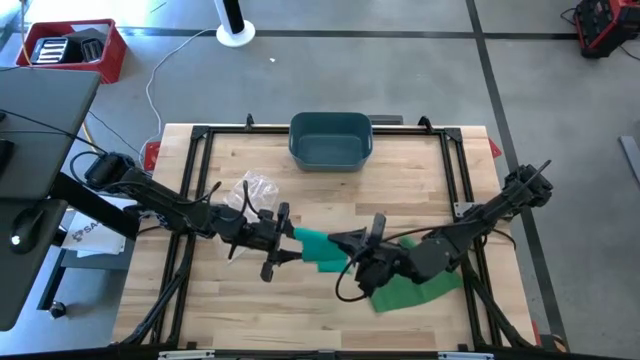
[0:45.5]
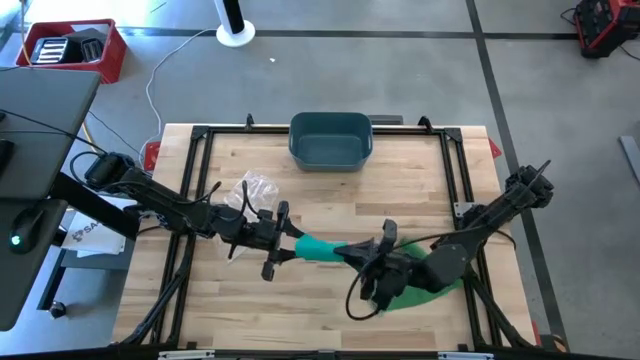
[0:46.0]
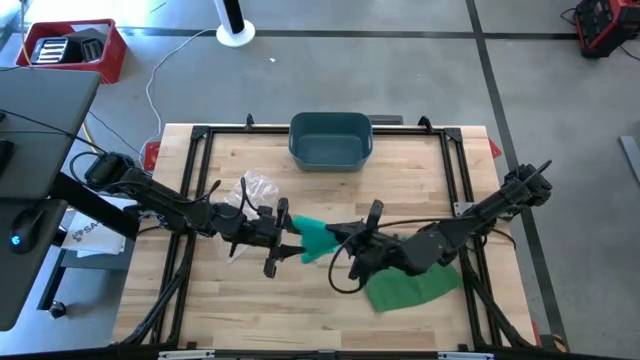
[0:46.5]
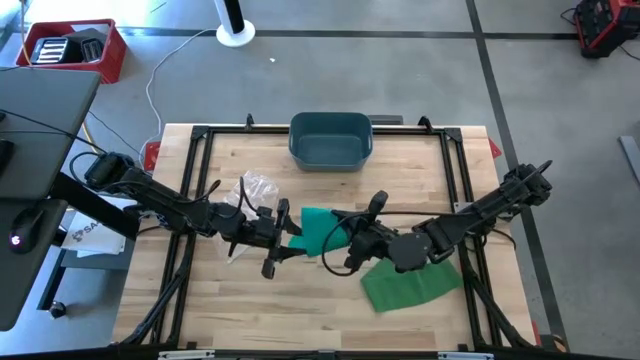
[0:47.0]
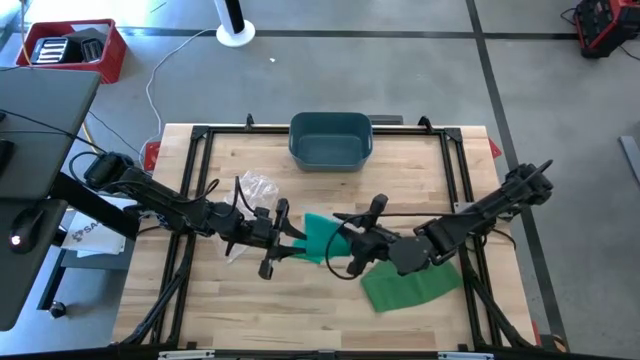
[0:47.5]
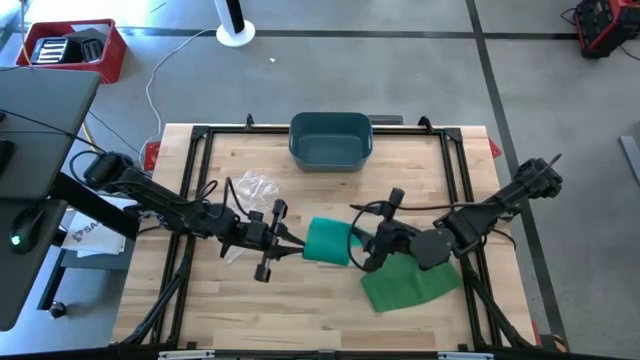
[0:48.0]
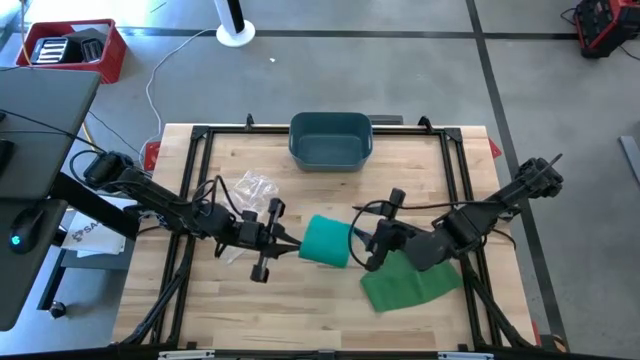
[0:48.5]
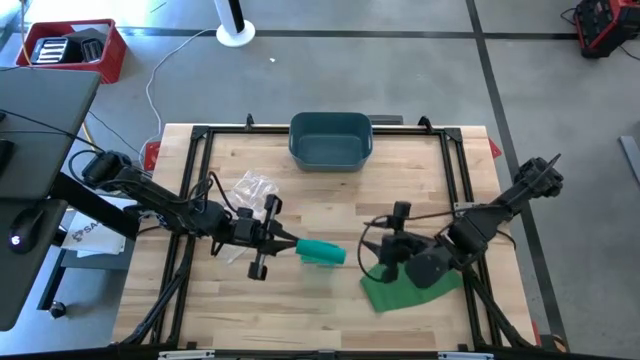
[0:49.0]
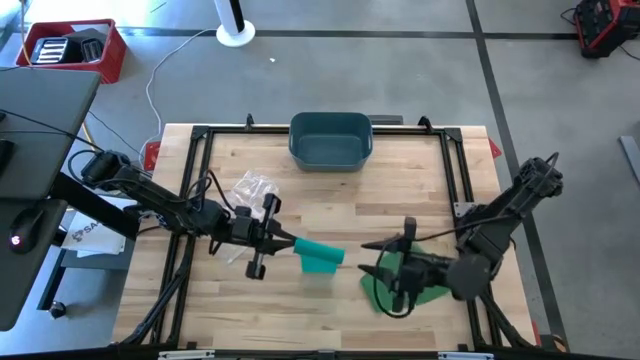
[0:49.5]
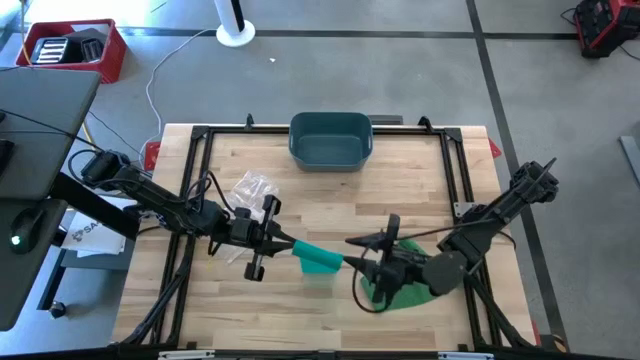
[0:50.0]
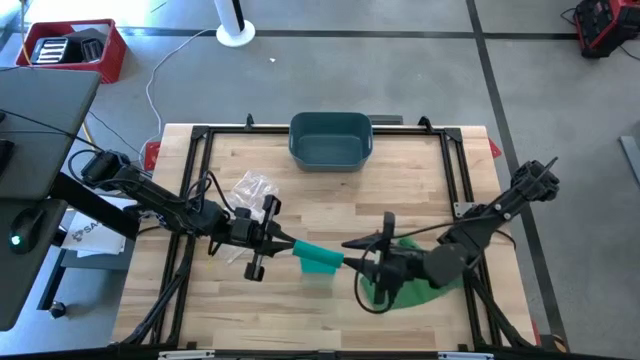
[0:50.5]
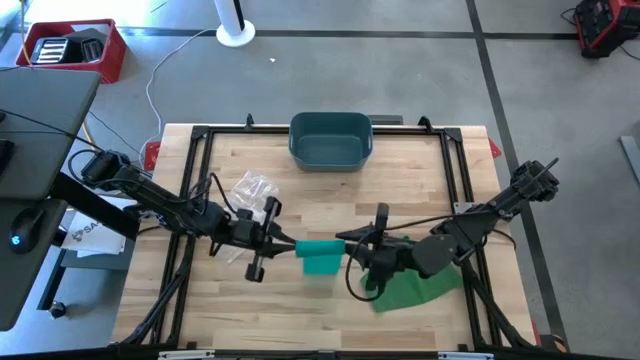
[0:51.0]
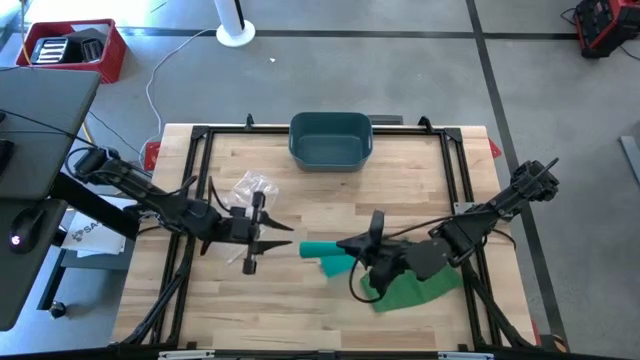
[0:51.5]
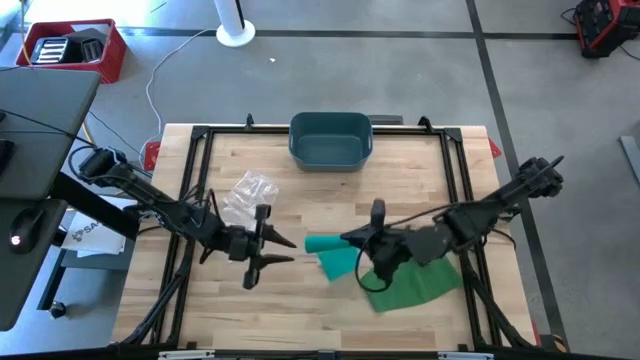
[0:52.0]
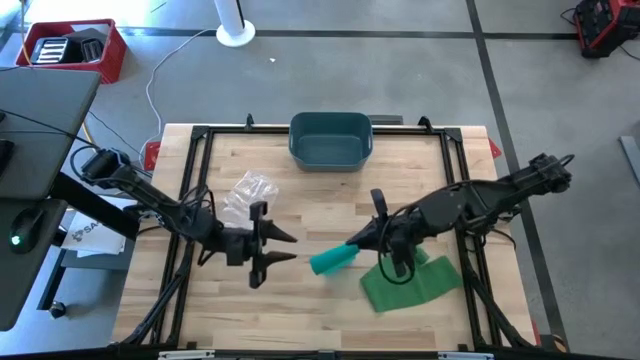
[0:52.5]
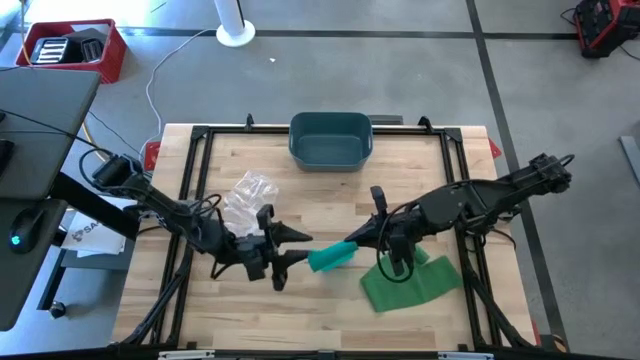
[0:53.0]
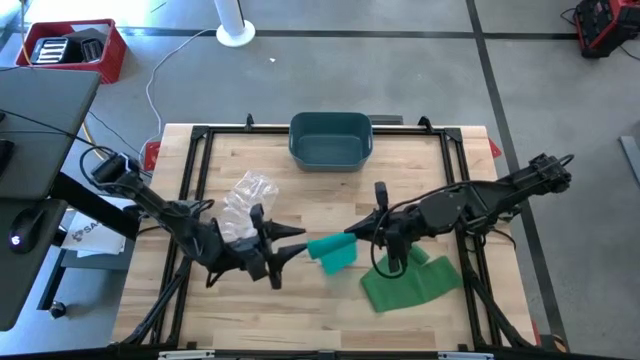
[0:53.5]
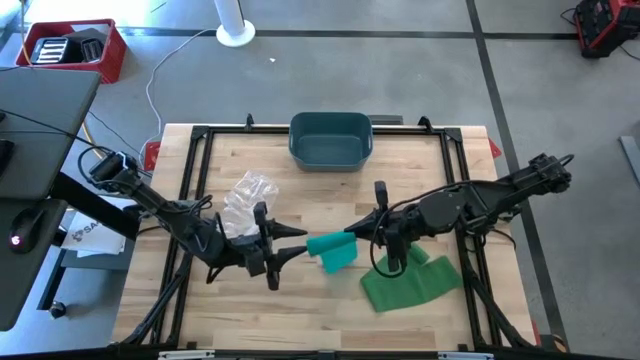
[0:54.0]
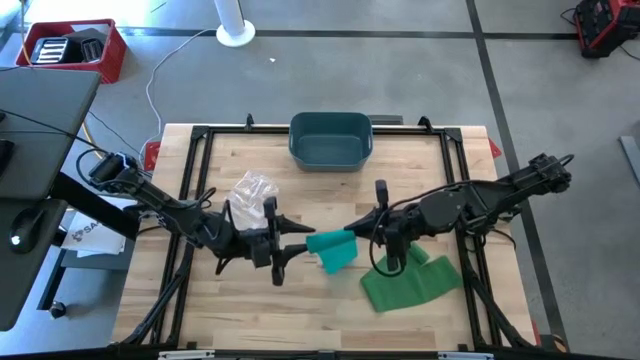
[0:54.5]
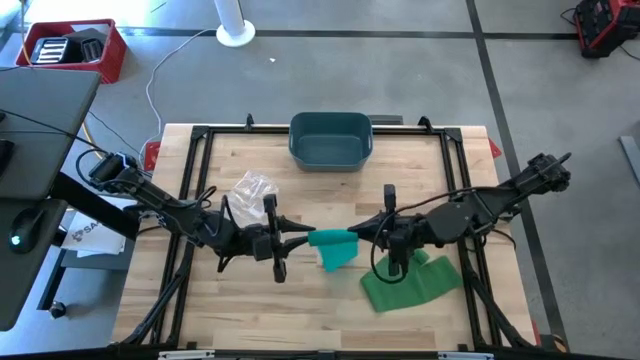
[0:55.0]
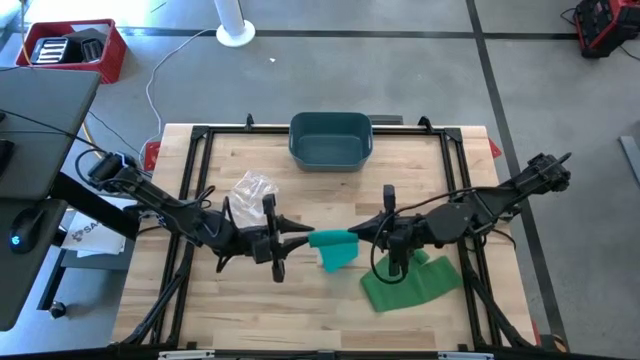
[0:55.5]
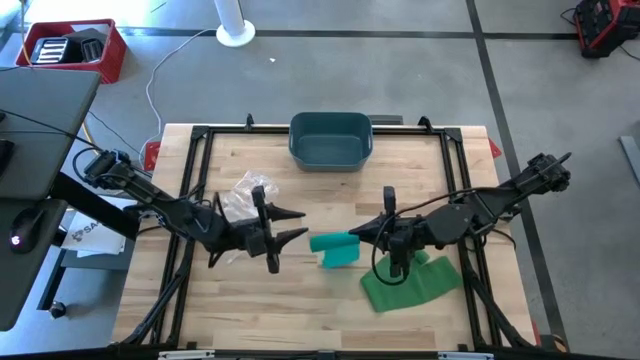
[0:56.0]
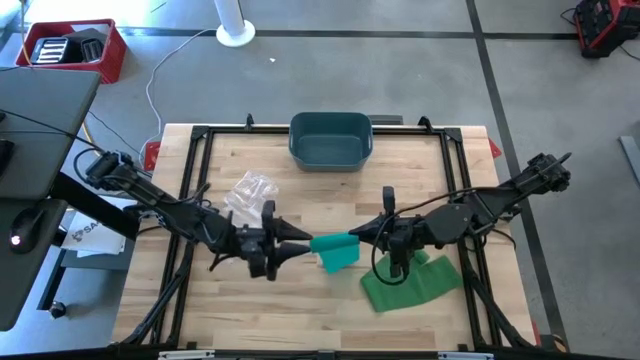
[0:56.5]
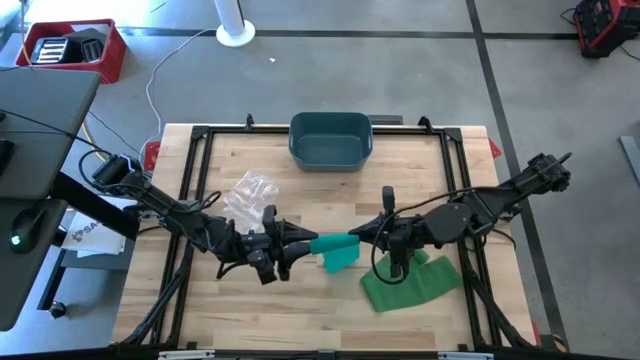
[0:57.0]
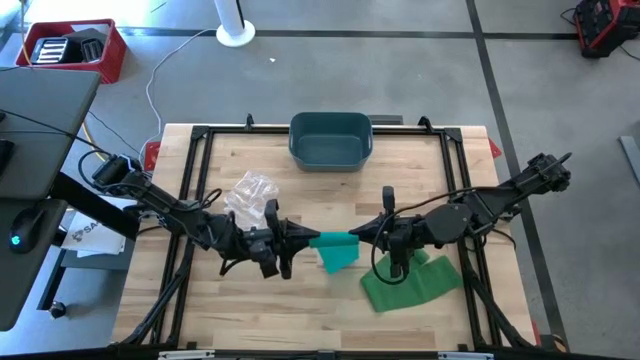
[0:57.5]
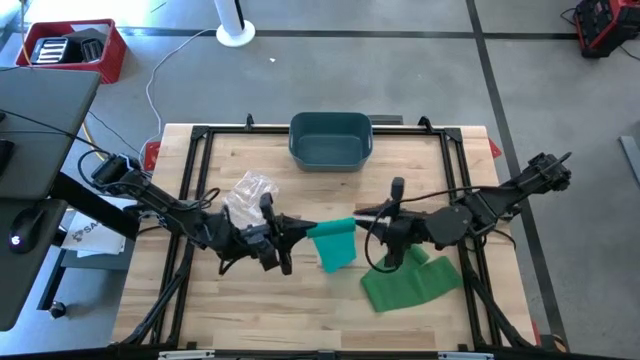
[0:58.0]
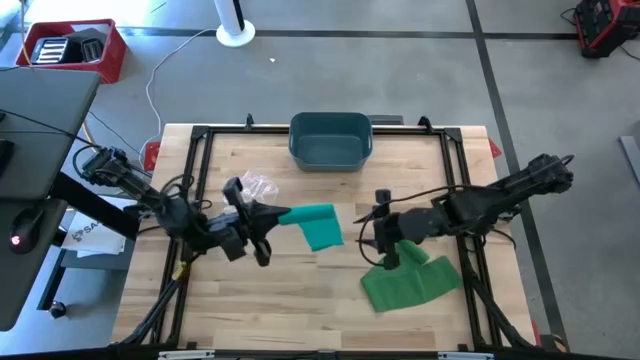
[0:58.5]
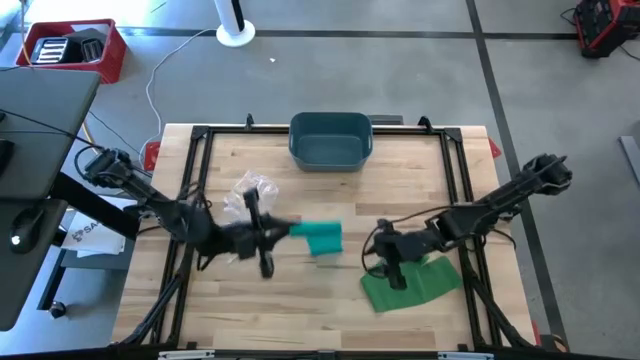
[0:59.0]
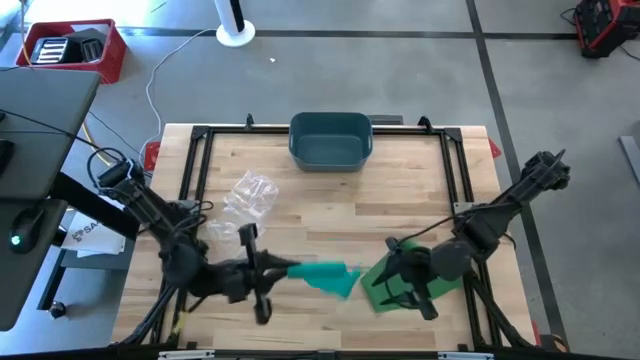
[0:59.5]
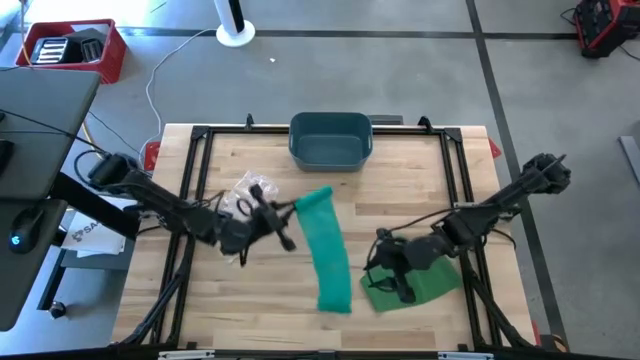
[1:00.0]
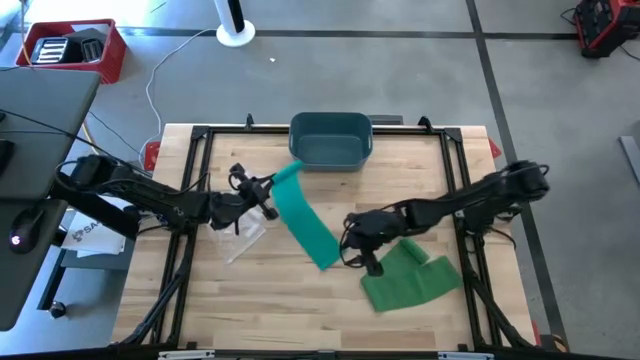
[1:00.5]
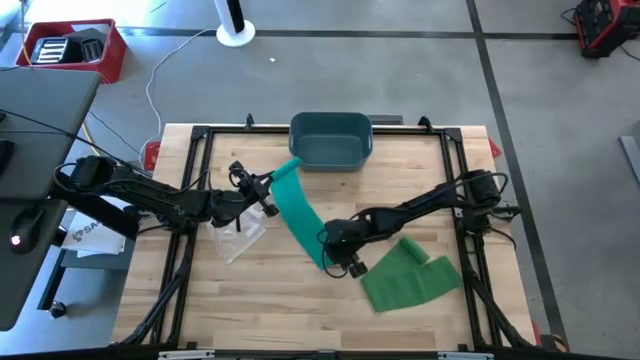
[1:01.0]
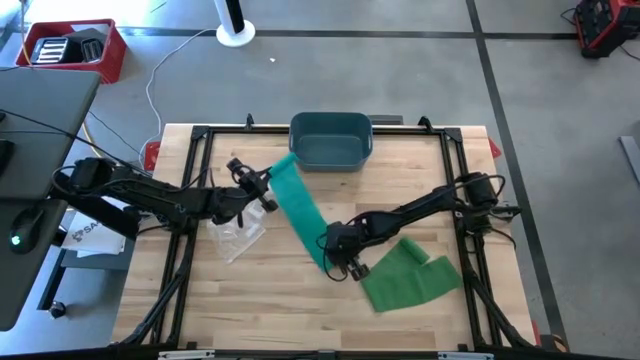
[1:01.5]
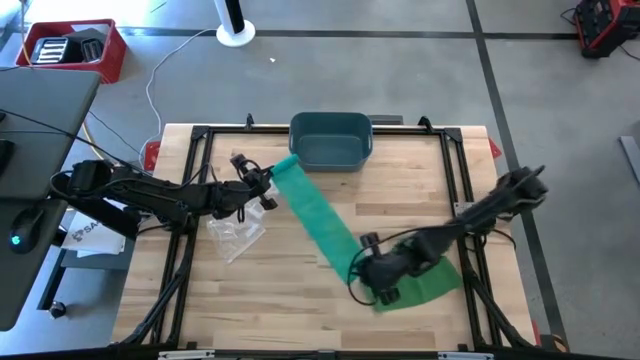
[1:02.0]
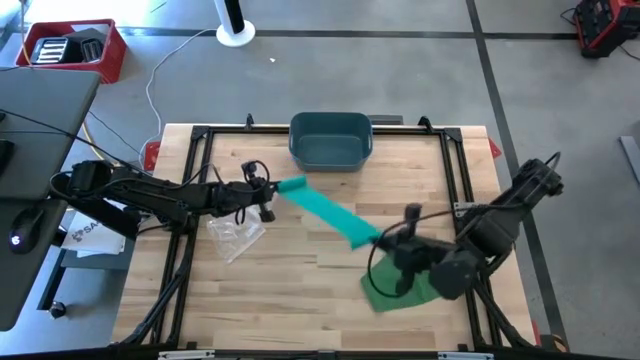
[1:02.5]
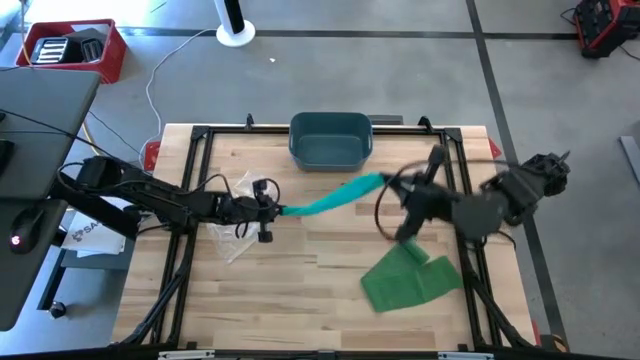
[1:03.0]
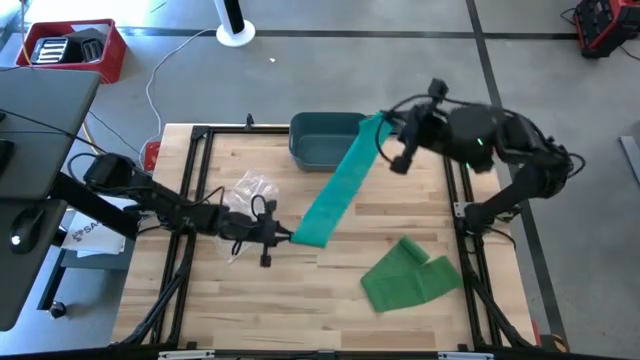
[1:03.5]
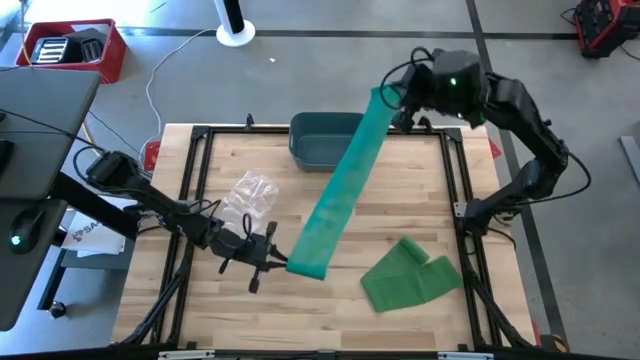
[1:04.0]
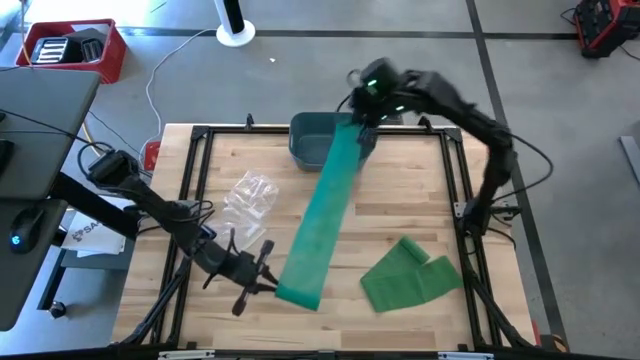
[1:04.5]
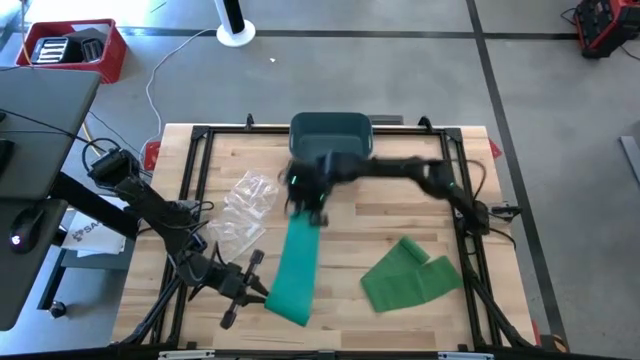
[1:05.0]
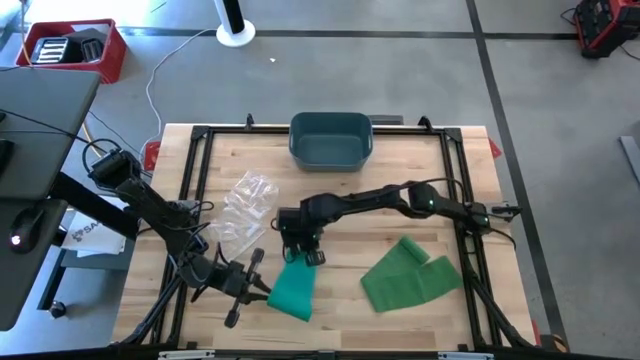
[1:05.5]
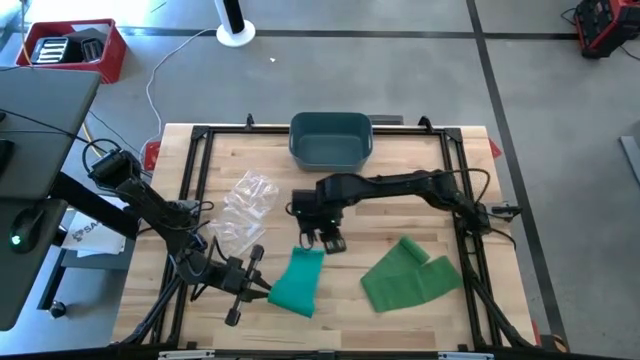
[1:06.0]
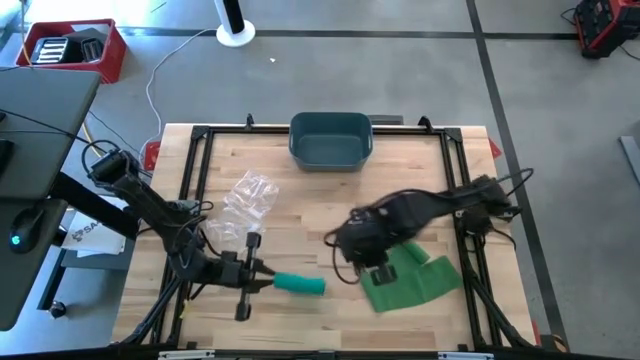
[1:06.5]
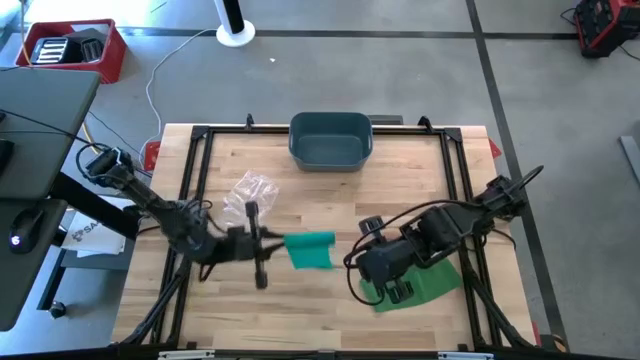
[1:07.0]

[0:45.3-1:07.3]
Task: Roll bandage
Roll the blue bandage
